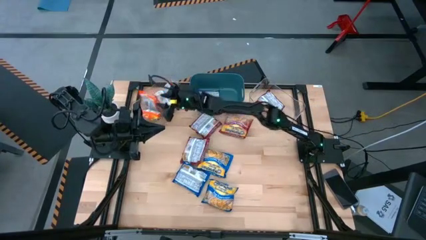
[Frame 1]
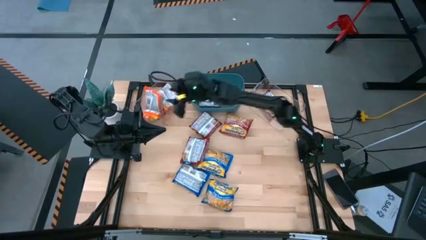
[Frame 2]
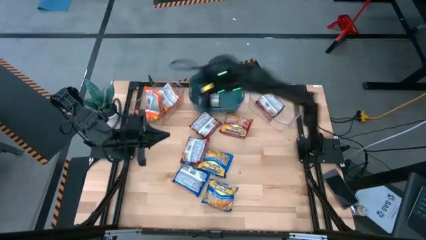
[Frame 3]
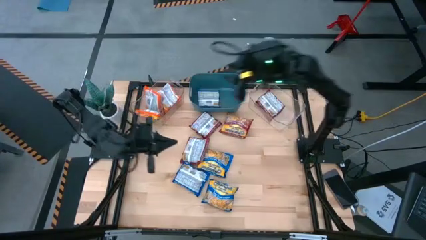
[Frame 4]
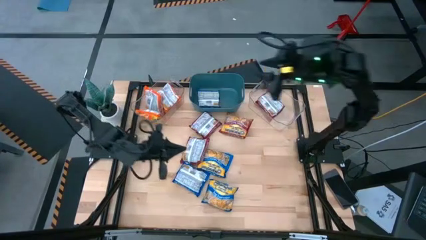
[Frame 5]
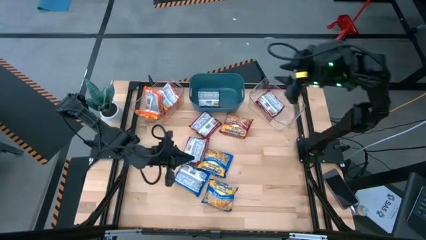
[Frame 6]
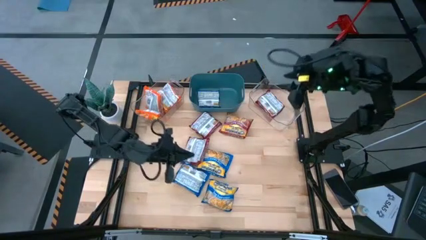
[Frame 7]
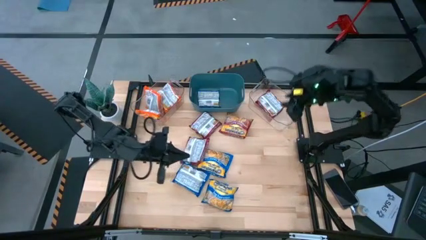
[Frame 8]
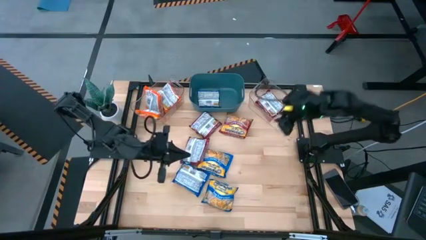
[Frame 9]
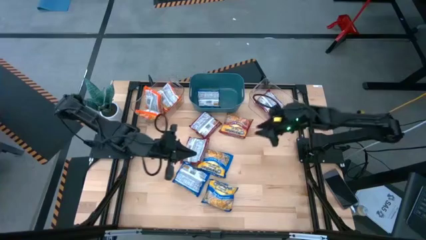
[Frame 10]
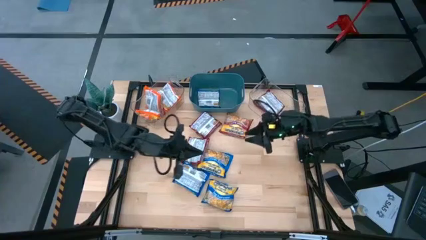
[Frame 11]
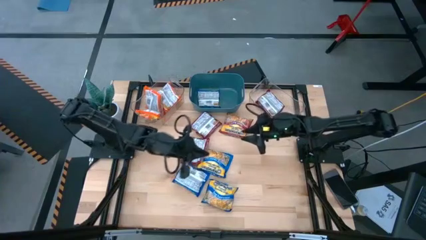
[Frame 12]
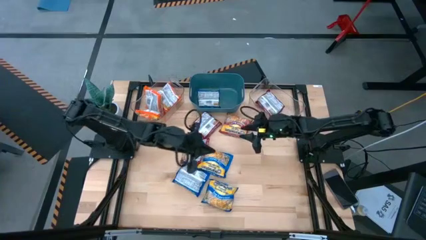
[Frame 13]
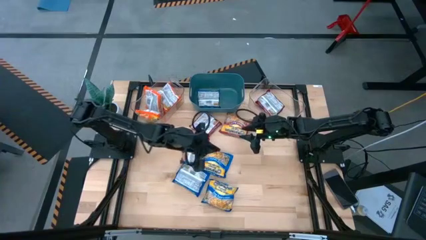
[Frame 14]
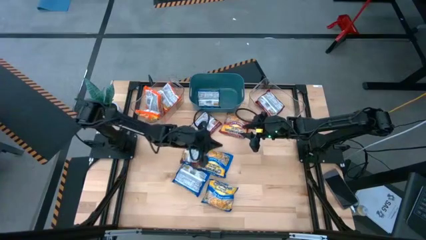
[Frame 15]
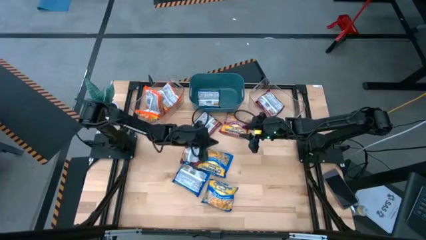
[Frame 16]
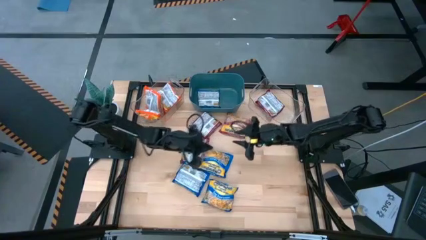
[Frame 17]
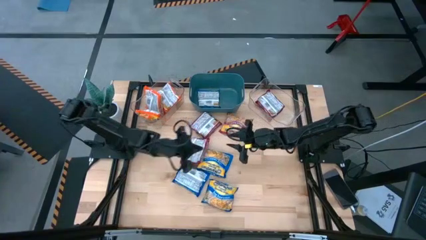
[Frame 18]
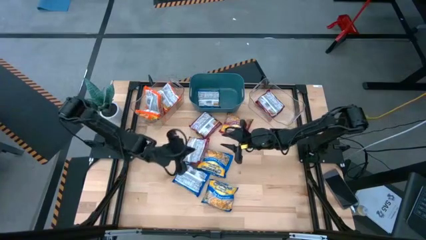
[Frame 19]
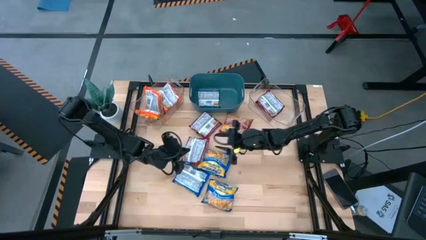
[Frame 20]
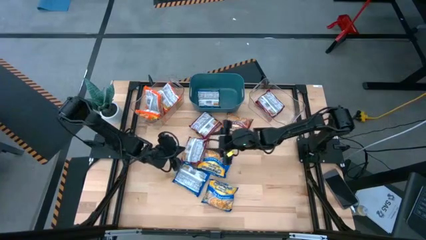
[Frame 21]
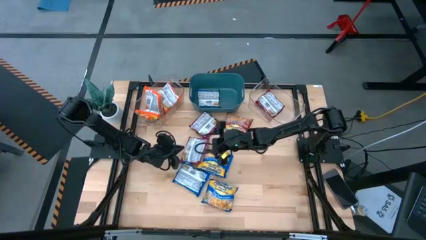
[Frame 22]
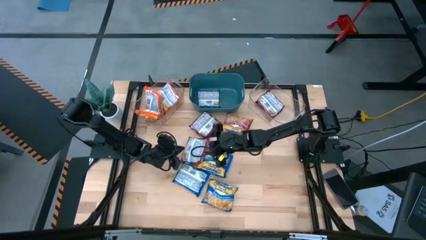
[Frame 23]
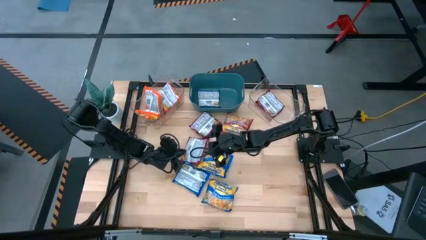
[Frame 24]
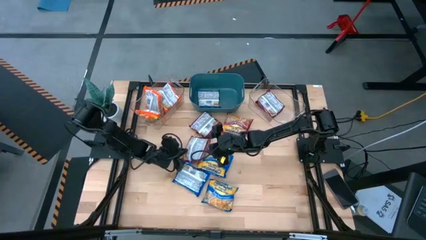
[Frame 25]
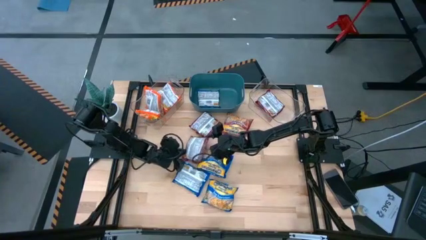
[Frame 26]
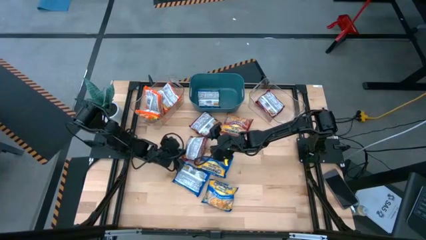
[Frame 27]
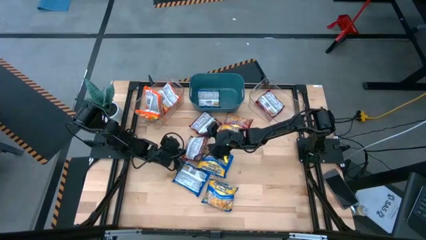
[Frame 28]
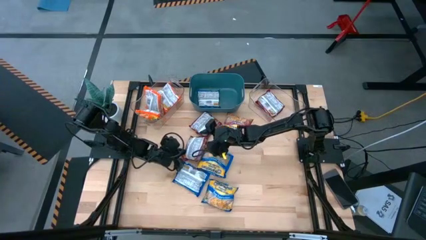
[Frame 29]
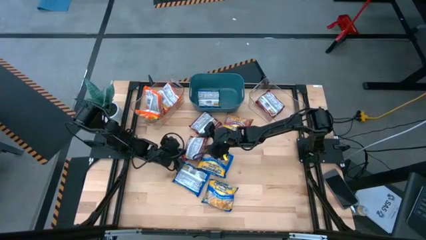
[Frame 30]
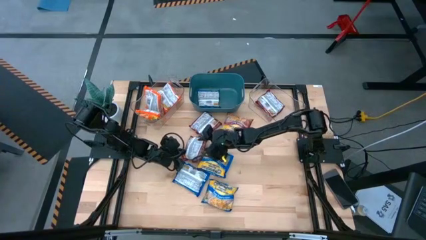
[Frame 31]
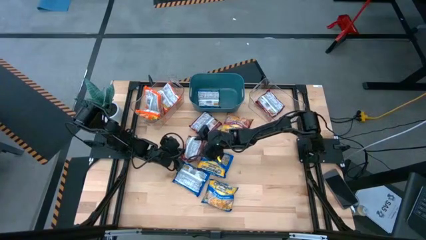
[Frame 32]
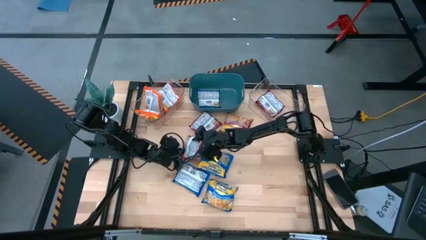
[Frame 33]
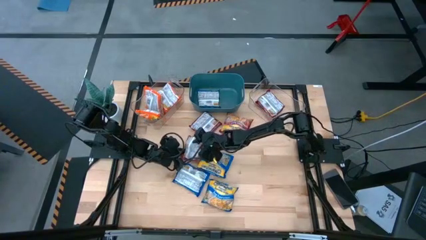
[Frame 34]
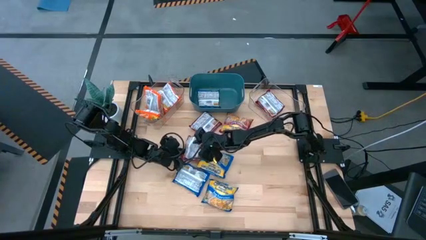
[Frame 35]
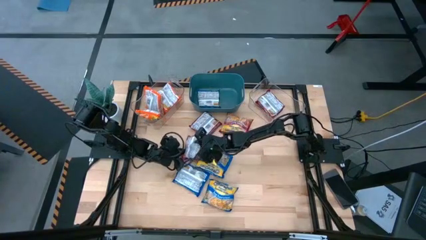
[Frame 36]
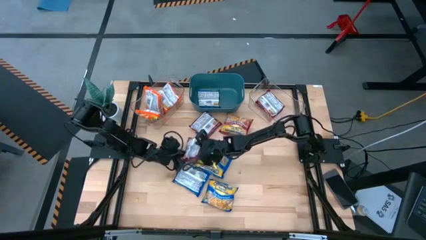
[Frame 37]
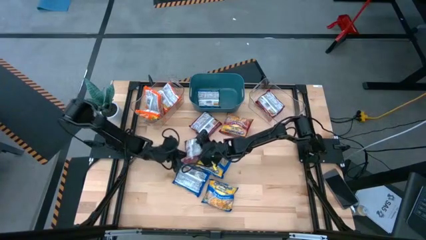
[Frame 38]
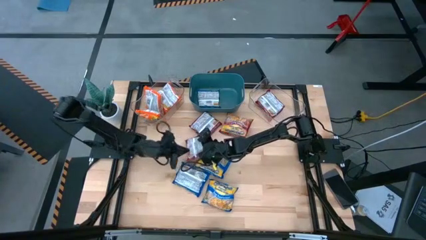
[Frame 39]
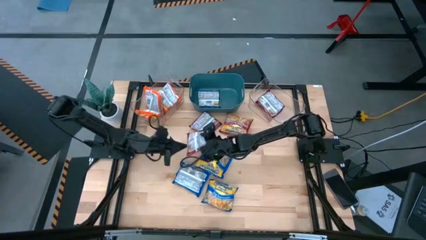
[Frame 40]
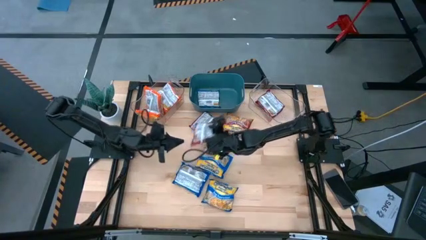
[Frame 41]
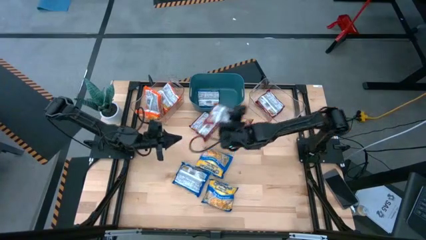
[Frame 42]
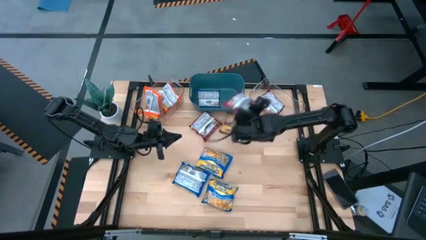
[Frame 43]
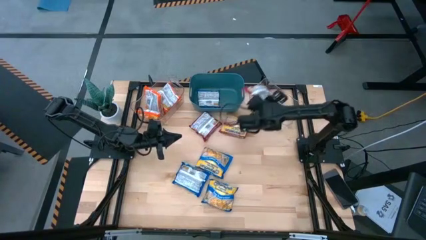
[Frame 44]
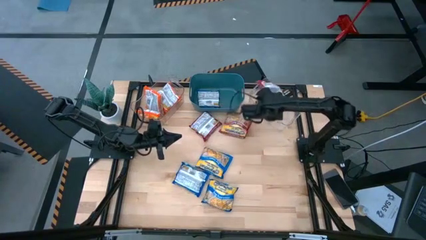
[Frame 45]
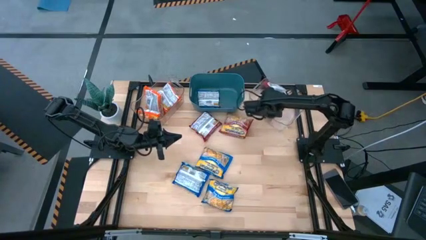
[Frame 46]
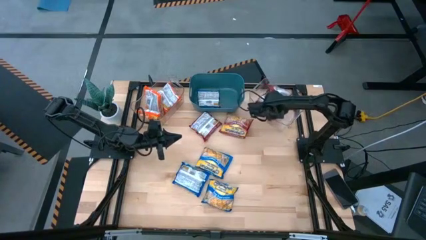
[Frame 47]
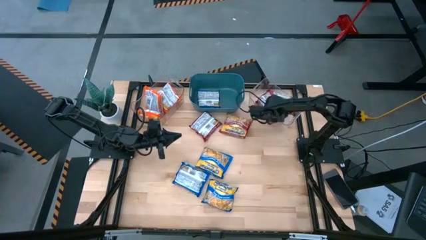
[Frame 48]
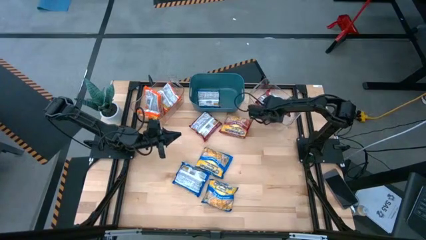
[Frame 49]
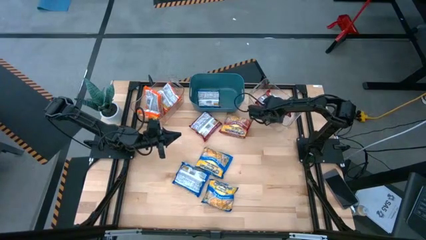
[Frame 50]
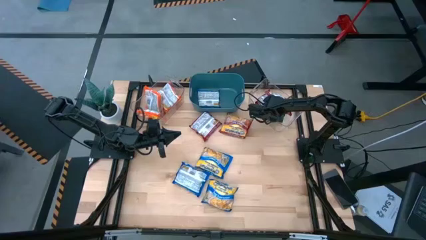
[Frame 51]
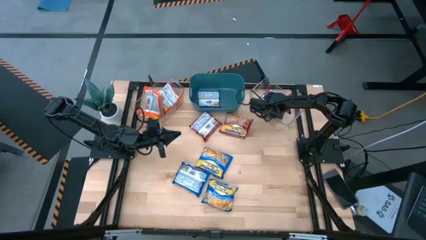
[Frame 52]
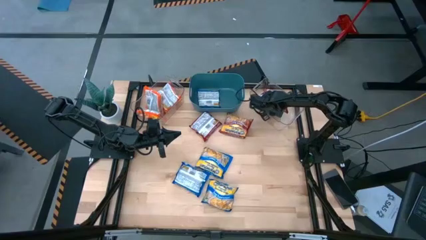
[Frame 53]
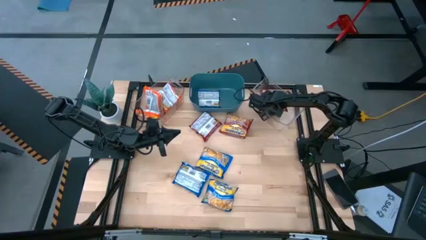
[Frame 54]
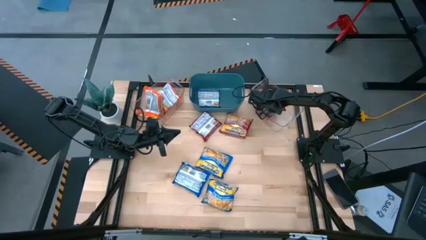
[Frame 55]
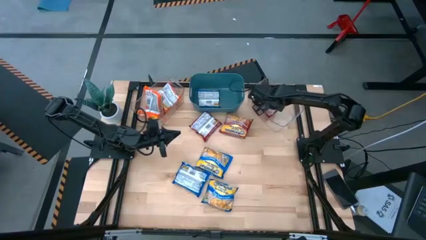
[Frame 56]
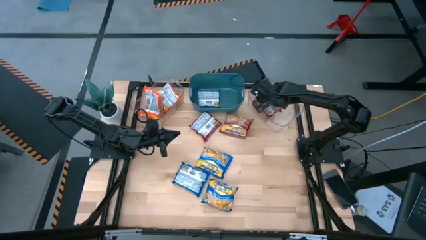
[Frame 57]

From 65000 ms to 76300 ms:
Task: Sort Maruchan noodles
Put the red noodle pack into the right transparent bin

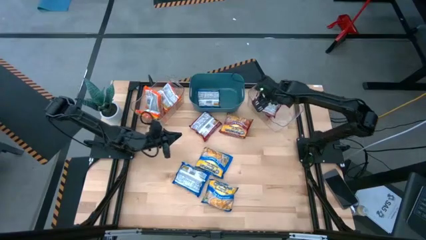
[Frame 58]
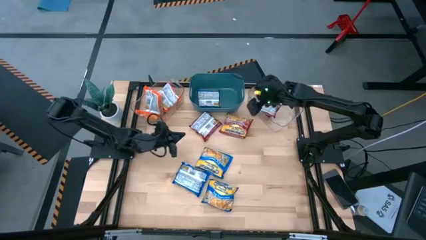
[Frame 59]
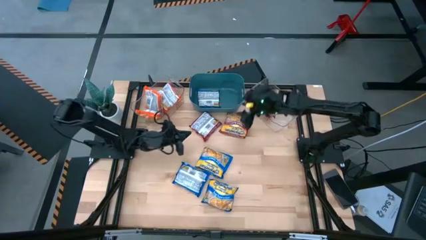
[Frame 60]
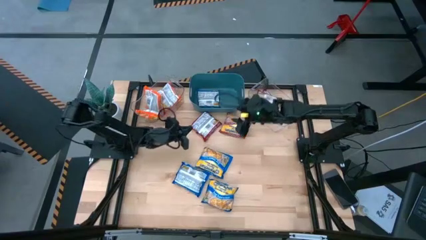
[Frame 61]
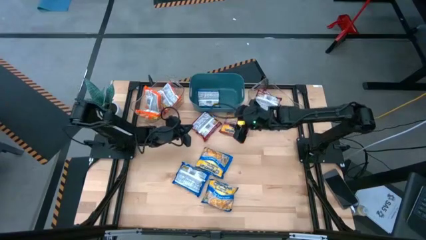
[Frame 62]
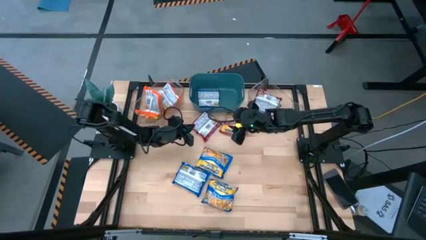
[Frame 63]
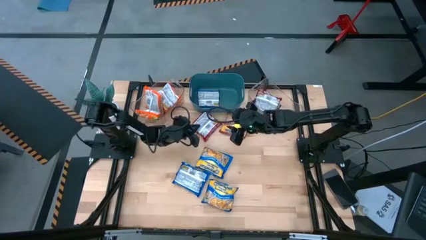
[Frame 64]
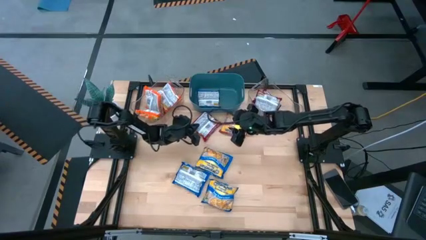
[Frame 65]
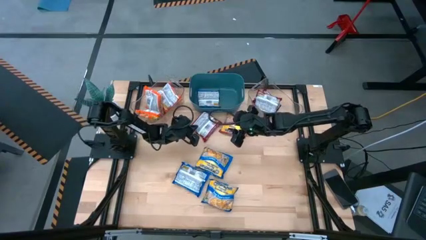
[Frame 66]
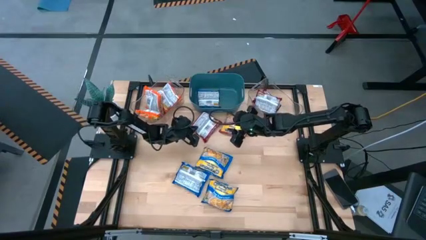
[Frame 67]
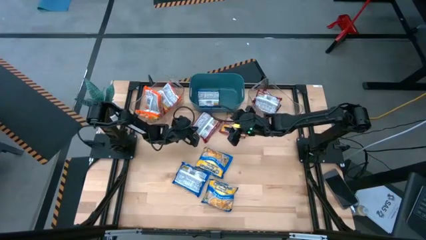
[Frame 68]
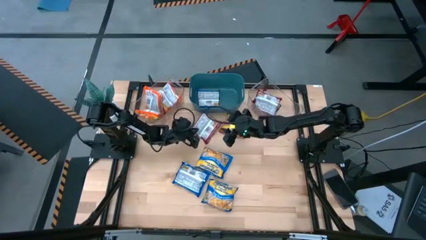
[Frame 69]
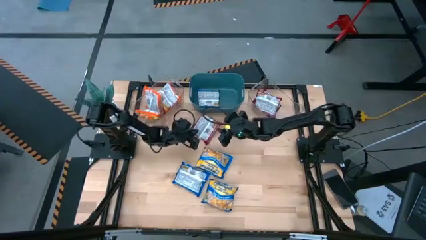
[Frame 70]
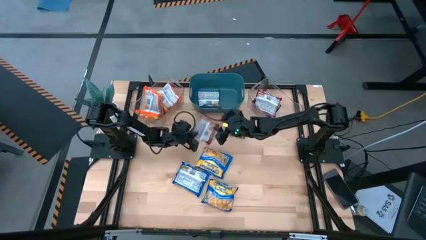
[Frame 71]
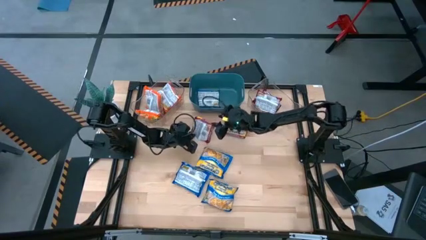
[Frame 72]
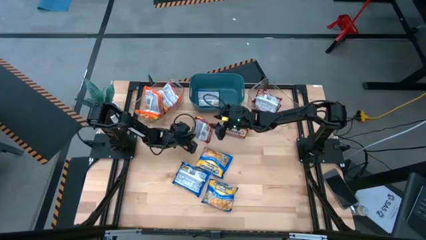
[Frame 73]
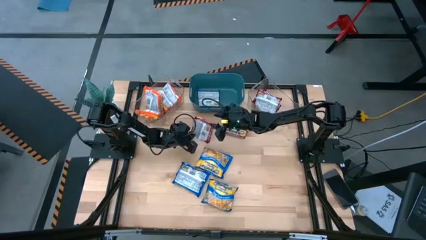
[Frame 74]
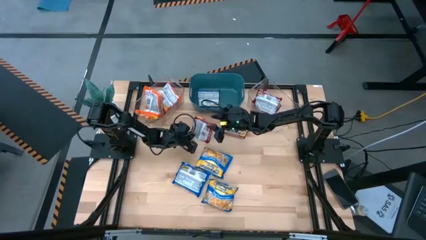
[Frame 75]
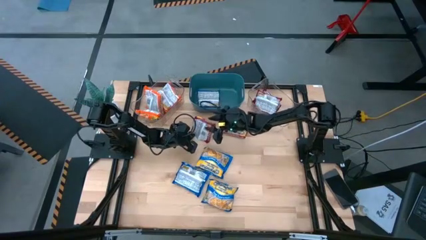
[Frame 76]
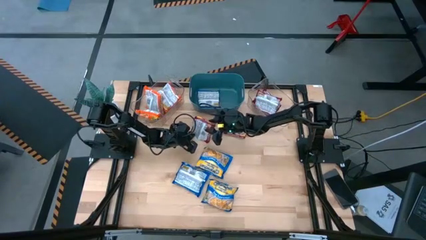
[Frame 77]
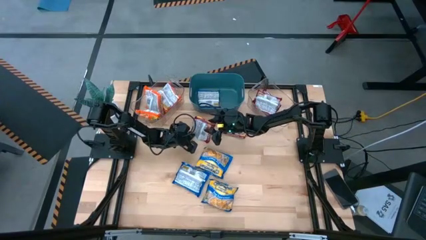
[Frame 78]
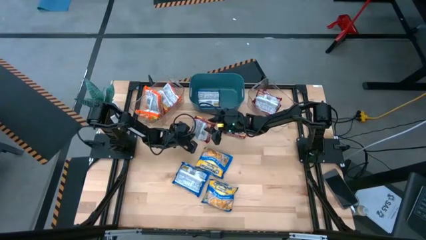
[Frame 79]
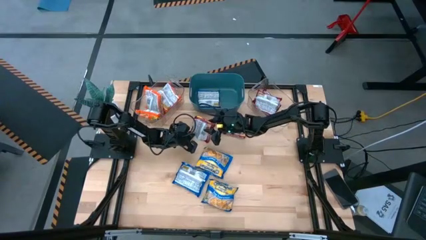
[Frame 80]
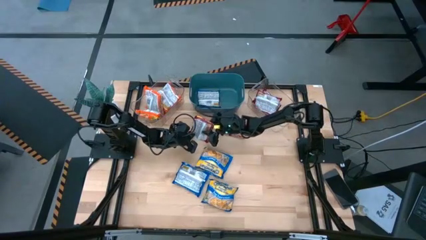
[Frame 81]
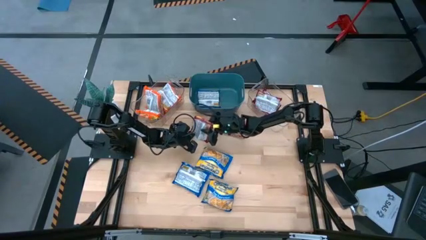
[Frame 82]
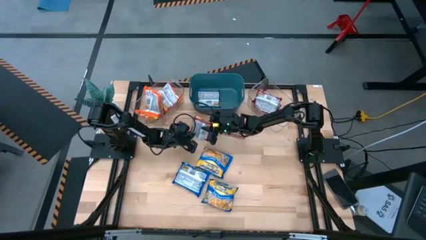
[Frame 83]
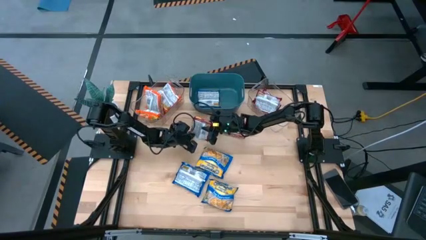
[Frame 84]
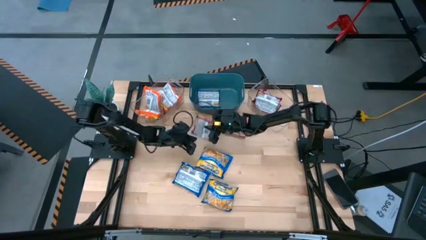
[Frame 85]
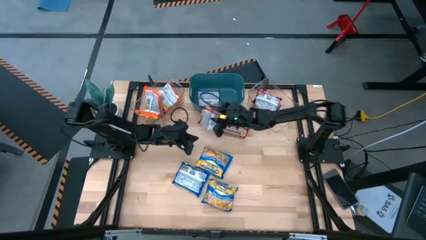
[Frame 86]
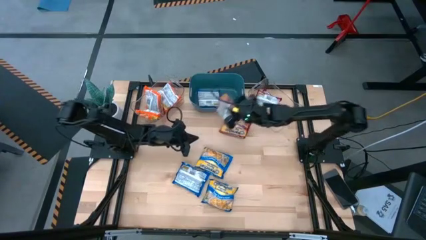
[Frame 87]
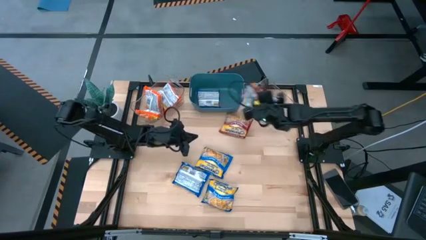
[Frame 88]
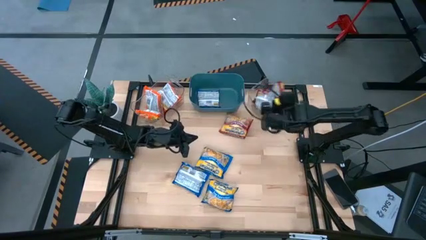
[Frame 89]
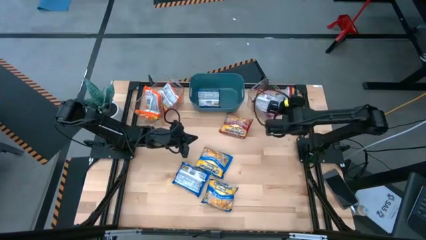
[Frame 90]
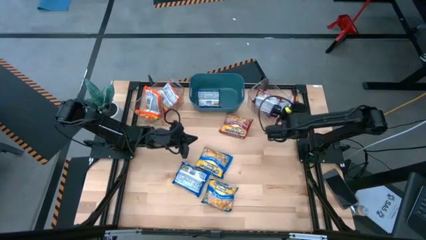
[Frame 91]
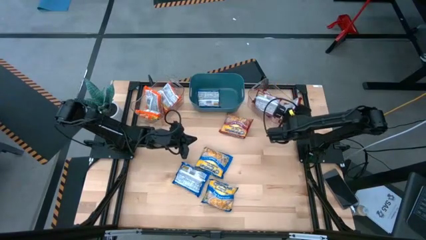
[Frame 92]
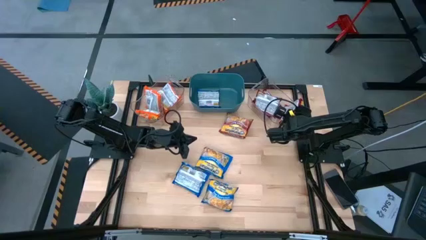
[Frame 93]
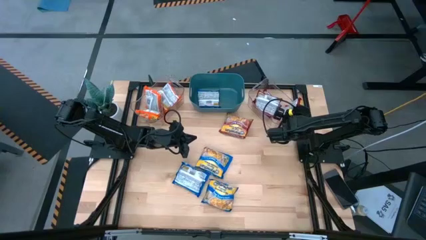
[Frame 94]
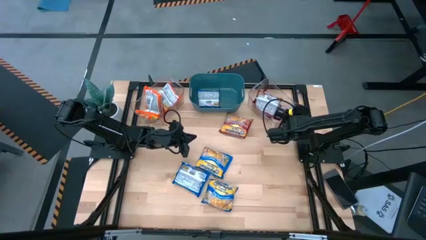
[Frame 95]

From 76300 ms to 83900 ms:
Put the red noodle pack into the right transparent bin
